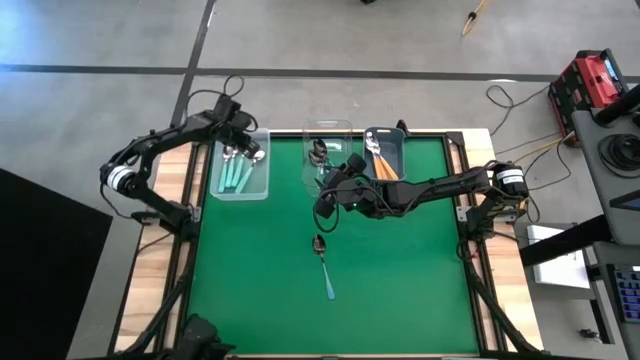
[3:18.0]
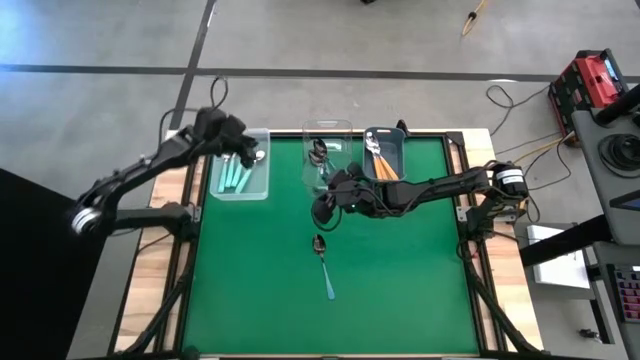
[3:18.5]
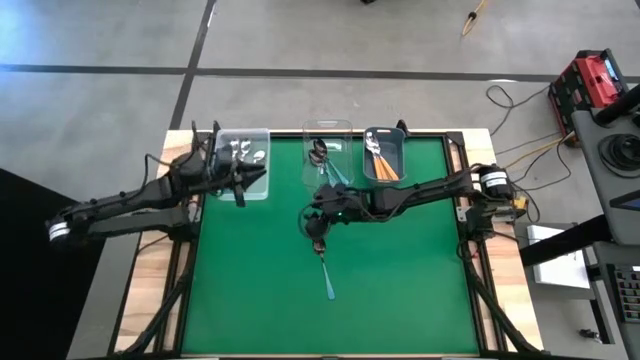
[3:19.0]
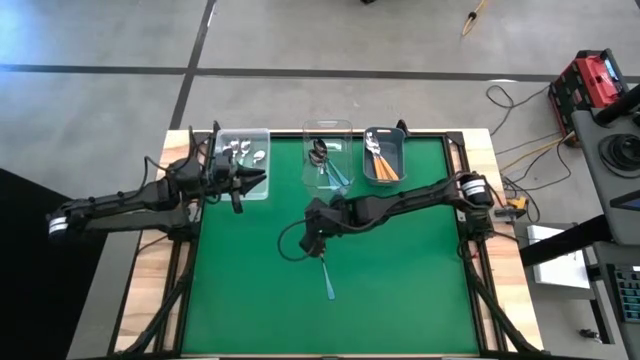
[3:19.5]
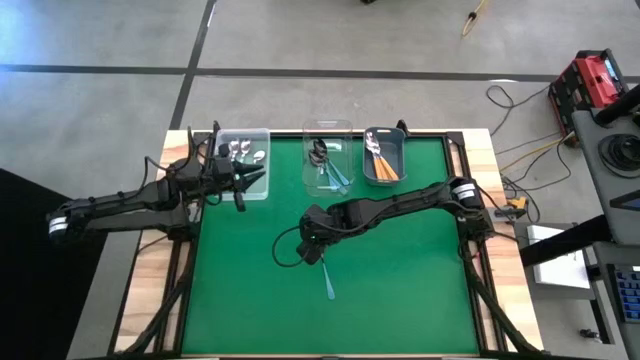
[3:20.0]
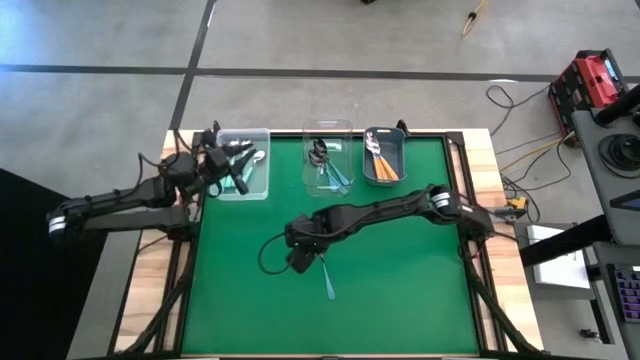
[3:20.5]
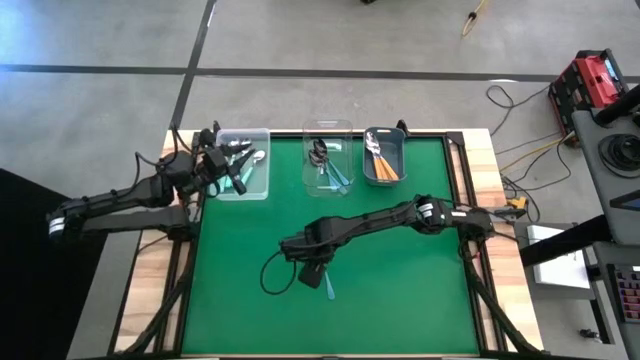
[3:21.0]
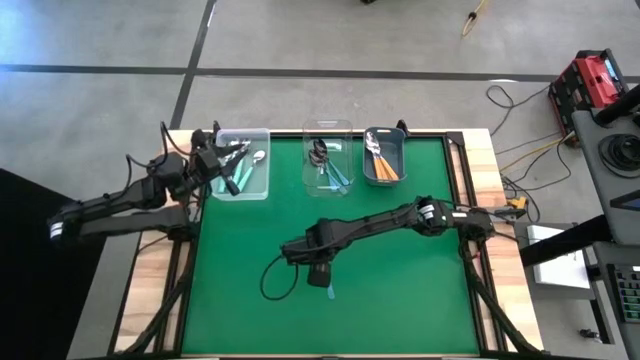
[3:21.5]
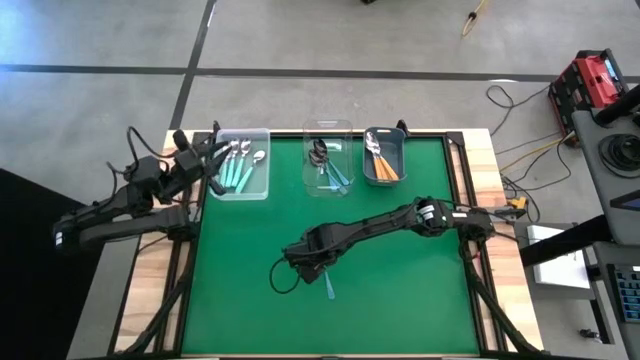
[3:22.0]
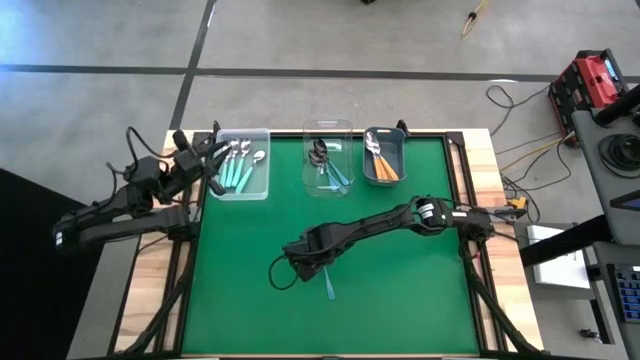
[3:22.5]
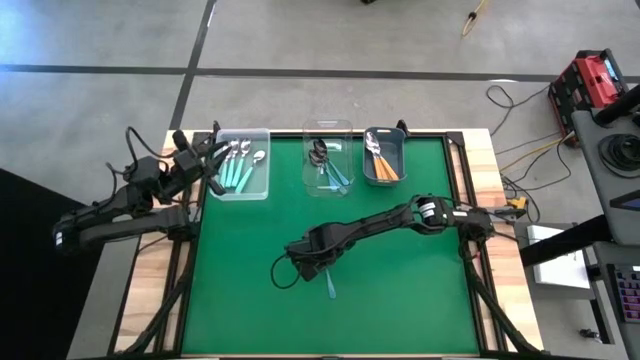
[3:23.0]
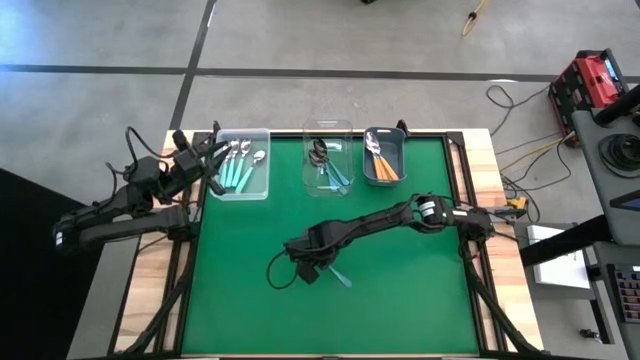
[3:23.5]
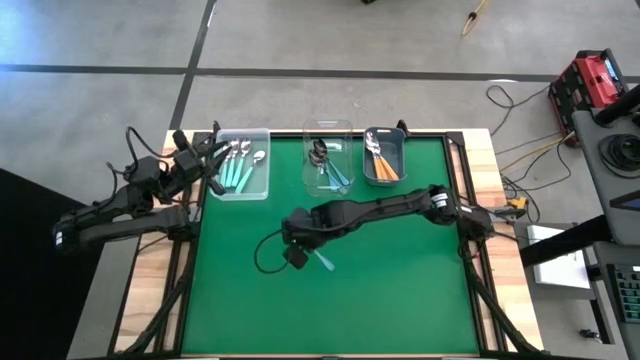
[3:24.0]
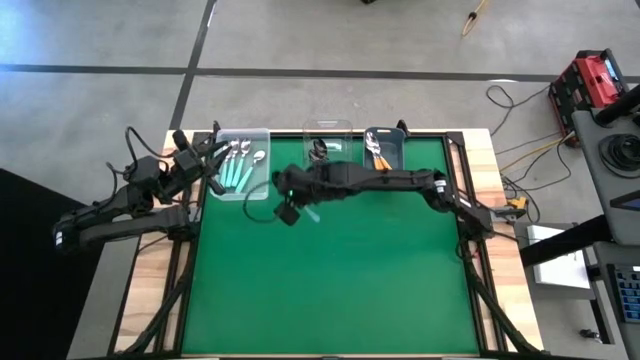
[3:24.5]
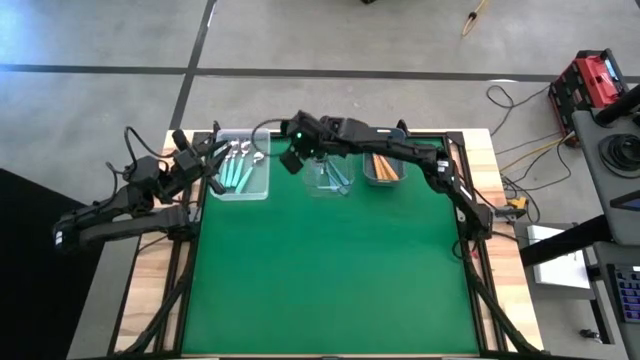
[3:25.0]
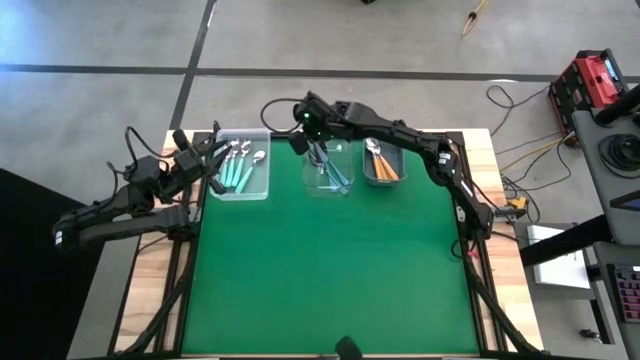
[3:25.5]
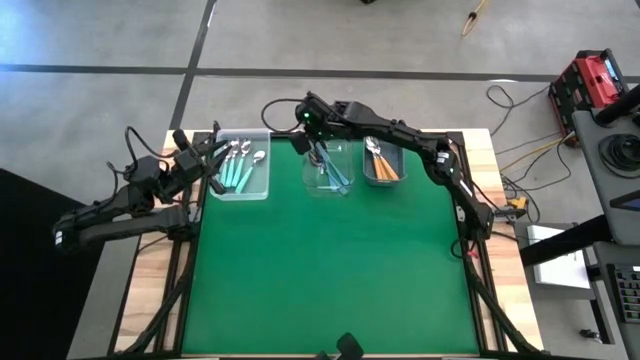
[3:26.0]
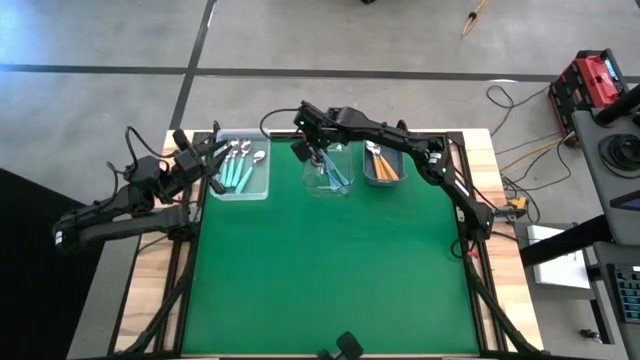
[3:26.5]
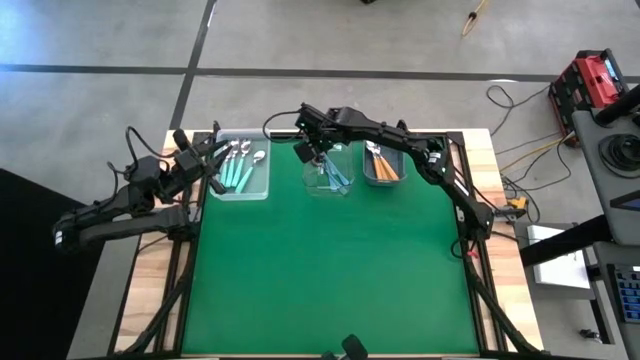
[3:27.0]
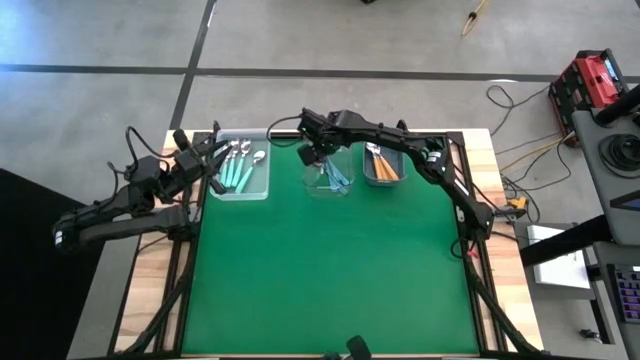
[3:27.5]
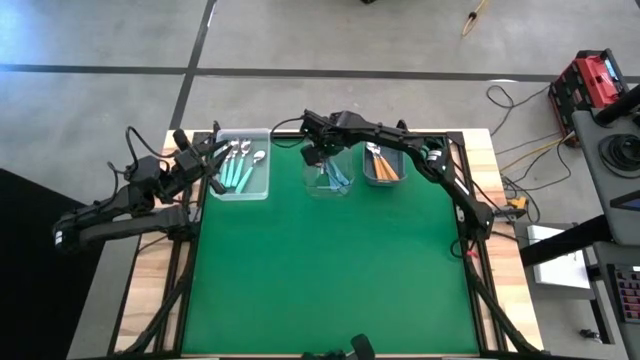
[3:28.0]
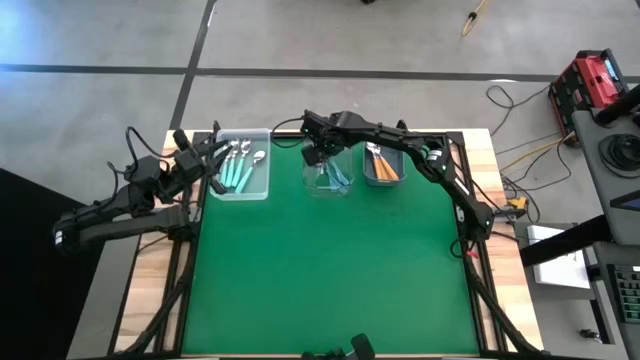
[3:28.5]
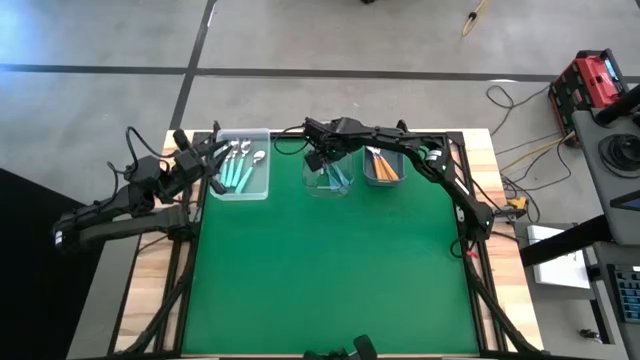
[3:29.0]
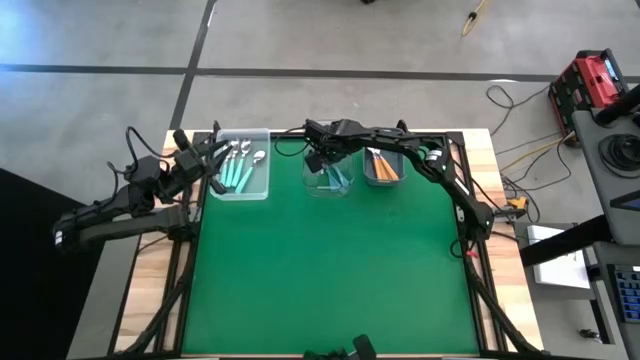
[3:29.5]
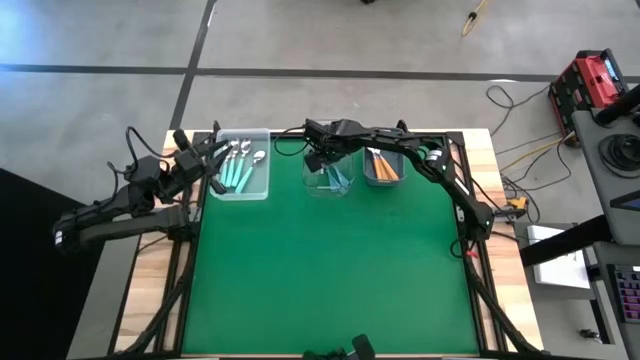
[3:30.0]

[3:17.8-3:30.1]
Task: Sort silverware by color (type)
Put the blue spoon into the transparent bin

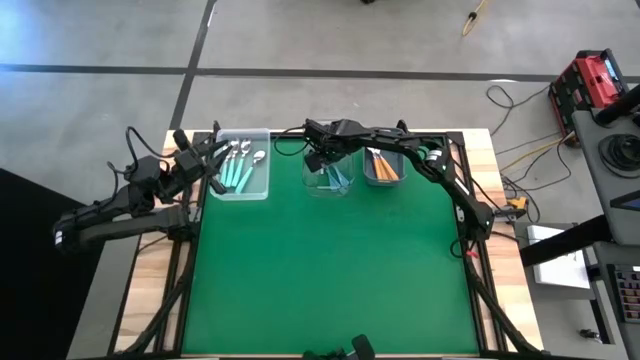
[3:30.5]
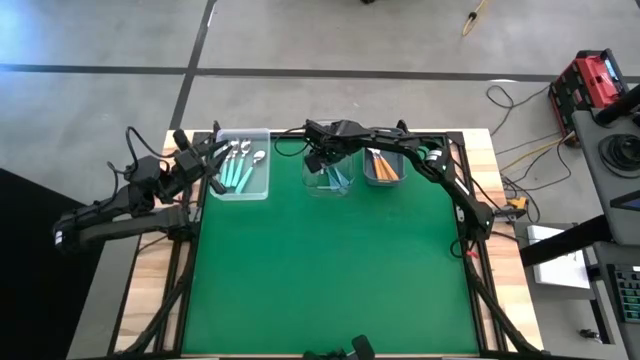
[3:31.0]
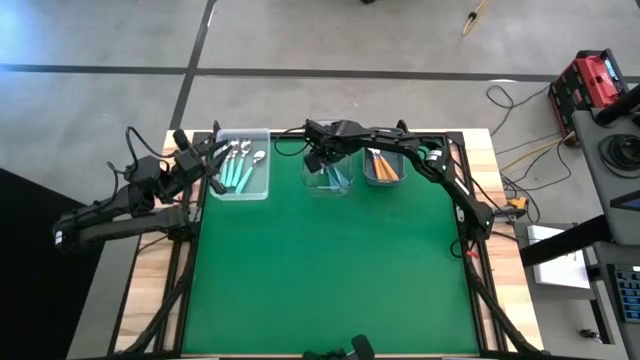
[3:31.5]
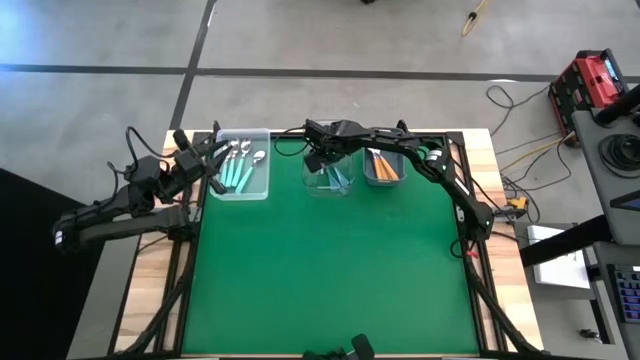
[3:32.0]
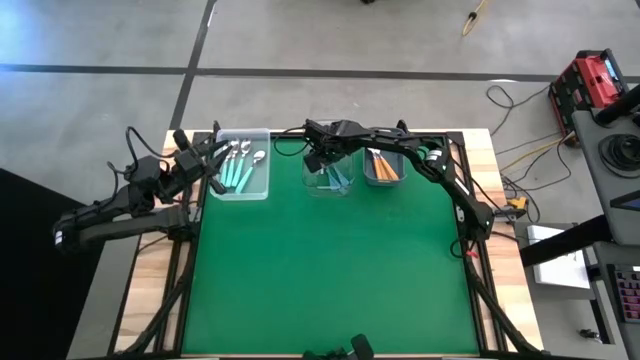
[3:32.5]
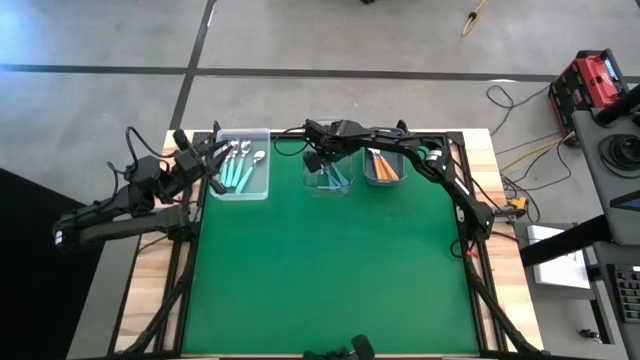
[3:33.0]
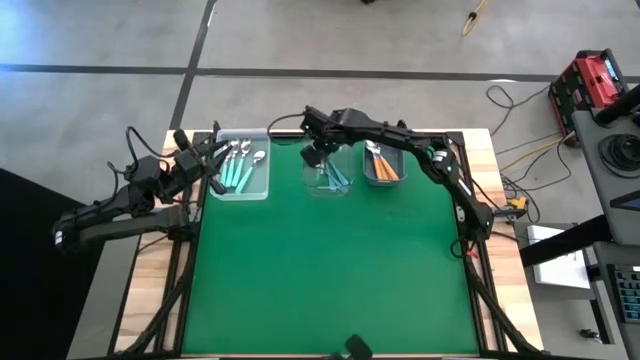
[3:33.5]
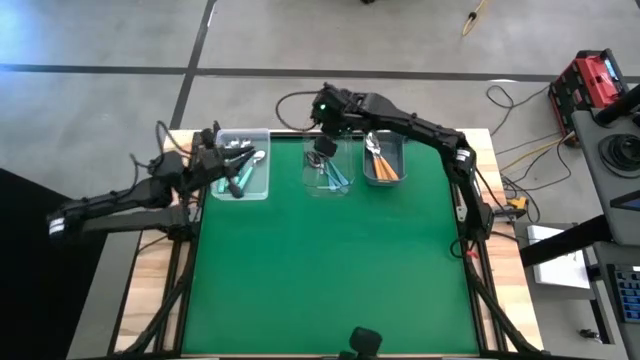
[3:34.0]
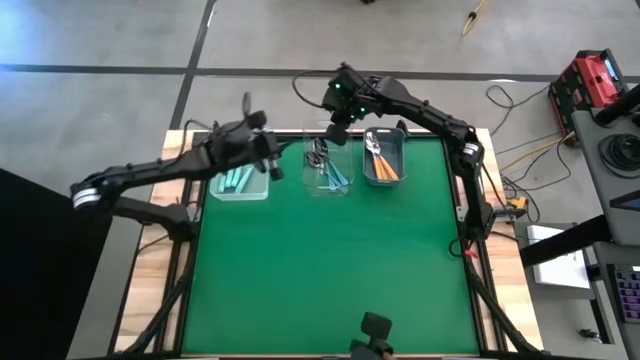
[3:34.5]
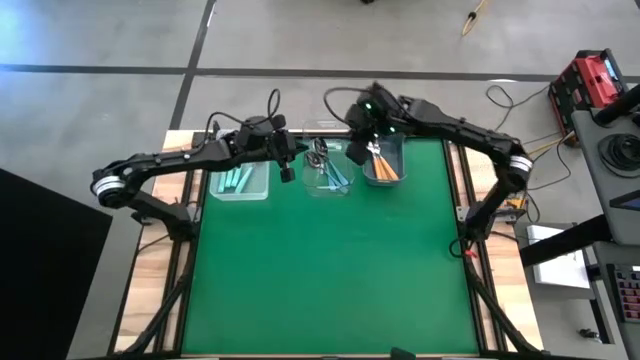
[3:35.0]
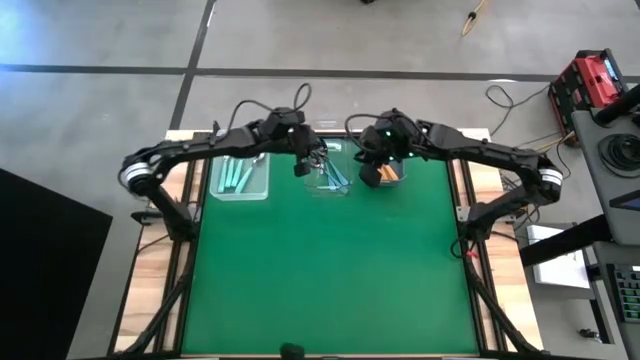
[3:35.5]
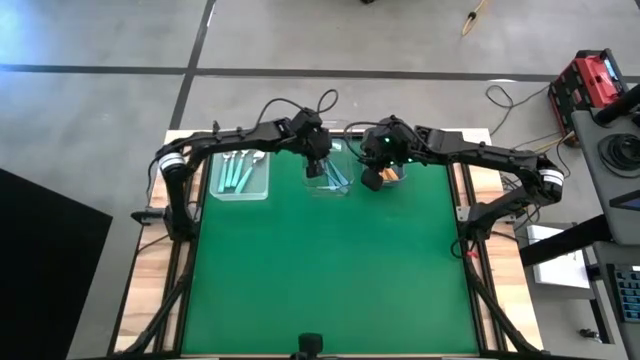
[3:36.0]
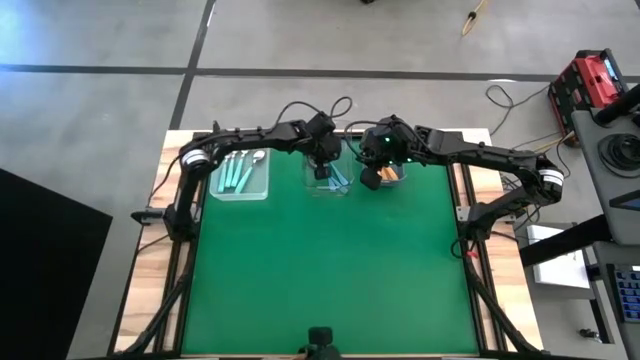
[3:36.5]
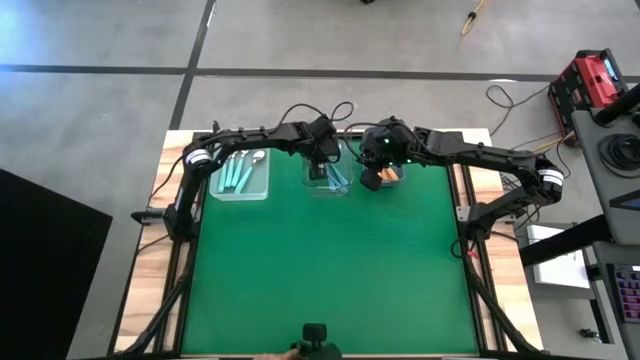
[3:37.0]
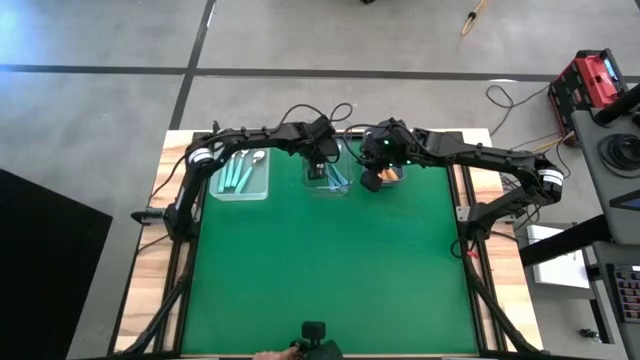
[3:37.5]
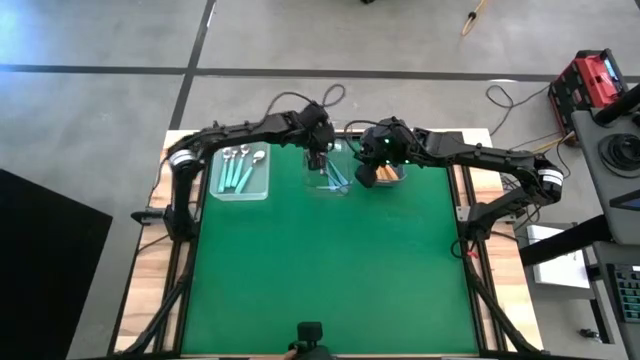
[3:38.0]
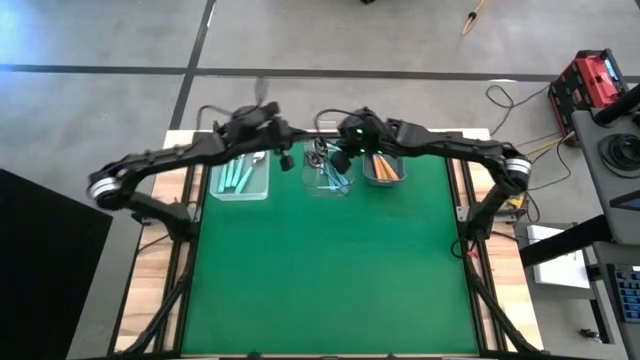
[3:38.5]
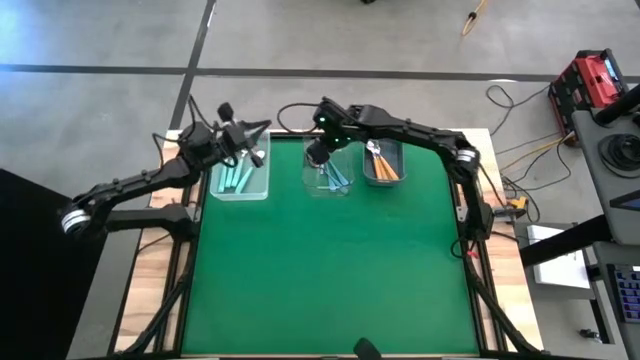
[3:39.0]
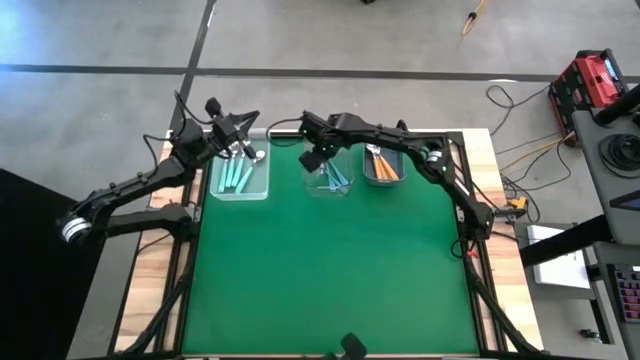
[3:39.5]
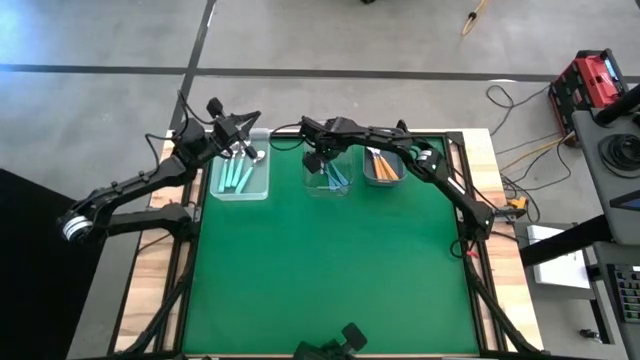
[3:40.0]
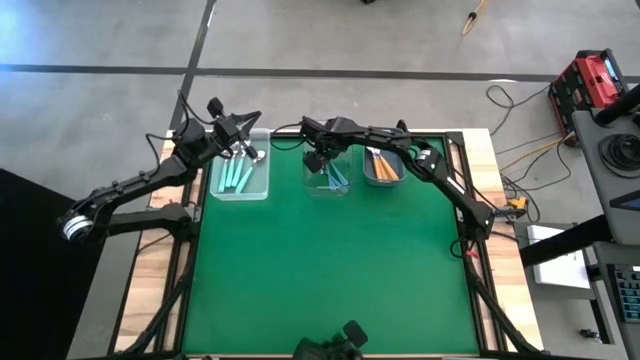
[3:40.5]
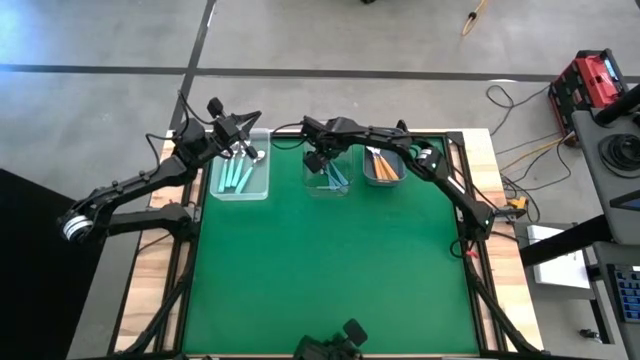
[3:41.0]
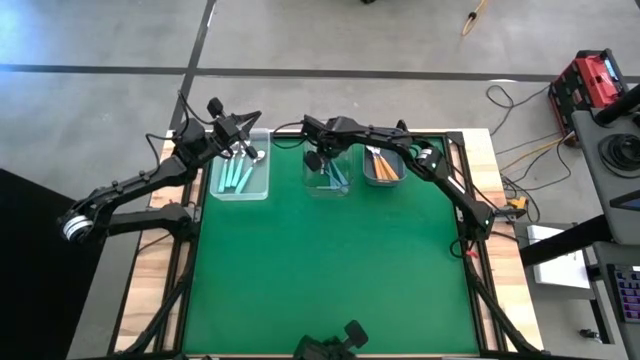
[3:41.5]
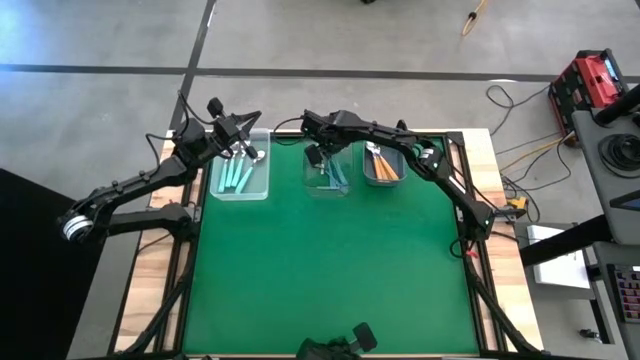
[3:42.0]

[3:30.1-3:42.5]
Put the blue spoon into the transparent bin
